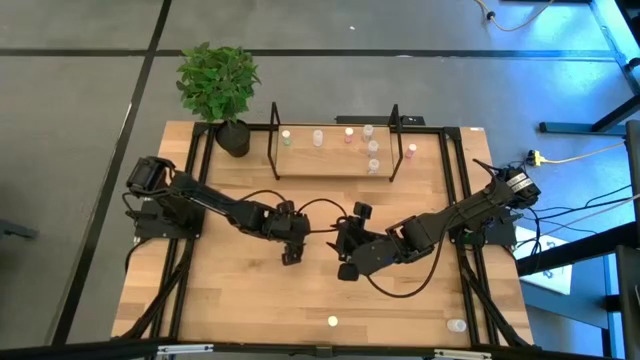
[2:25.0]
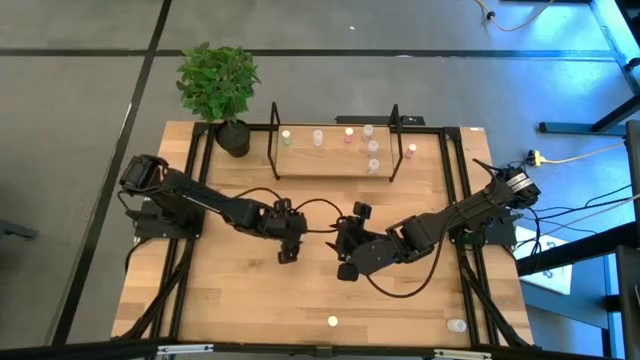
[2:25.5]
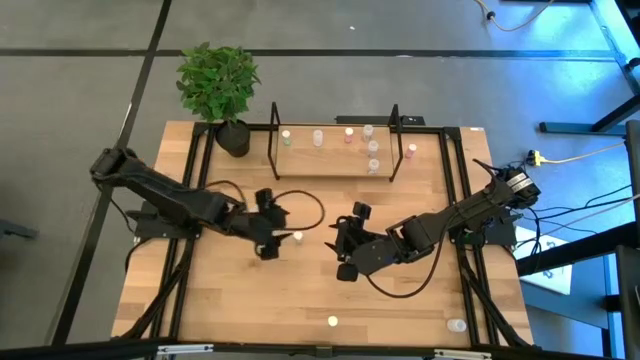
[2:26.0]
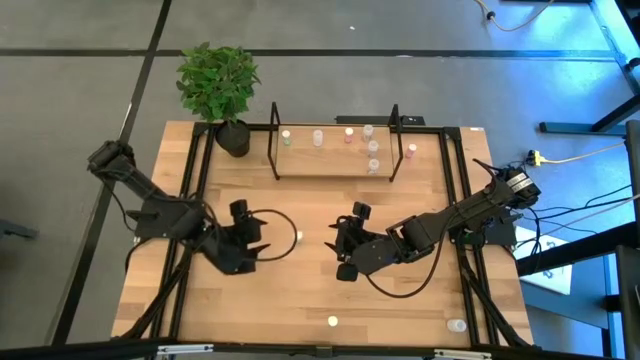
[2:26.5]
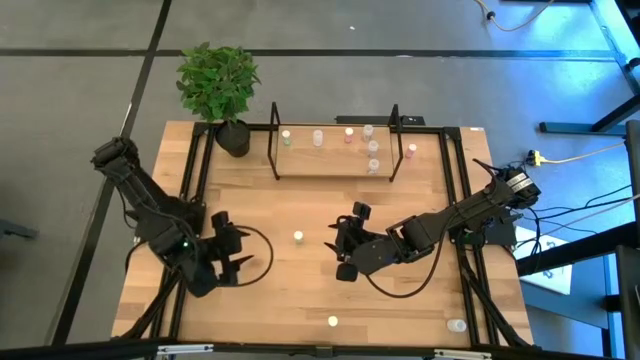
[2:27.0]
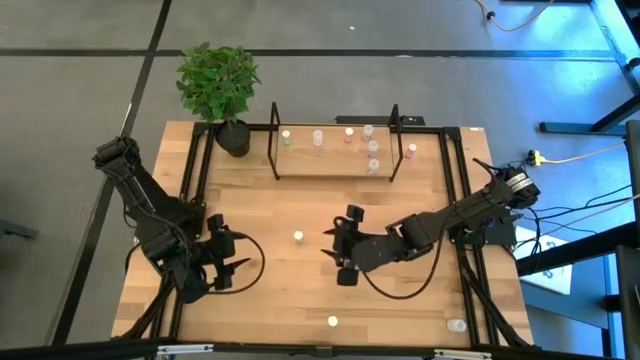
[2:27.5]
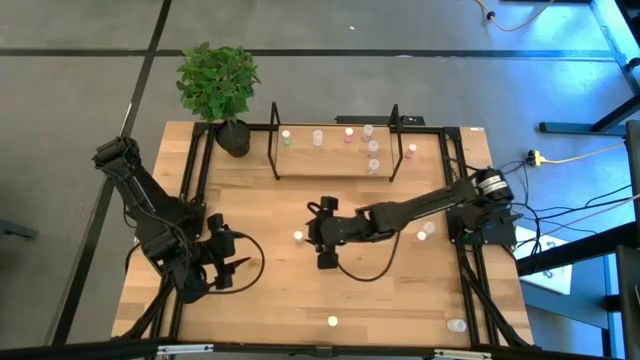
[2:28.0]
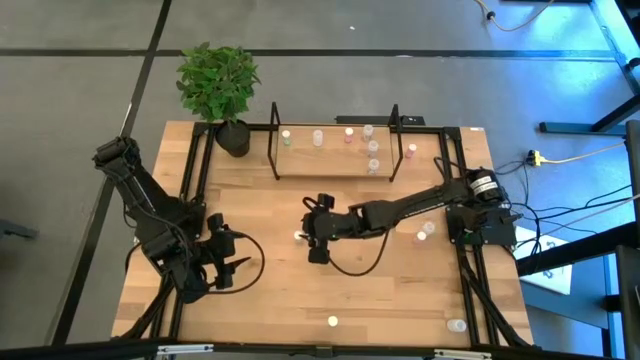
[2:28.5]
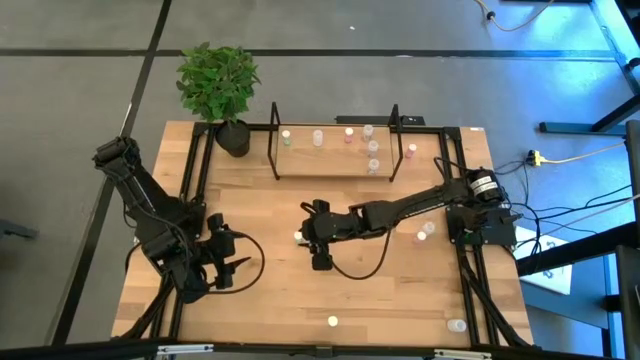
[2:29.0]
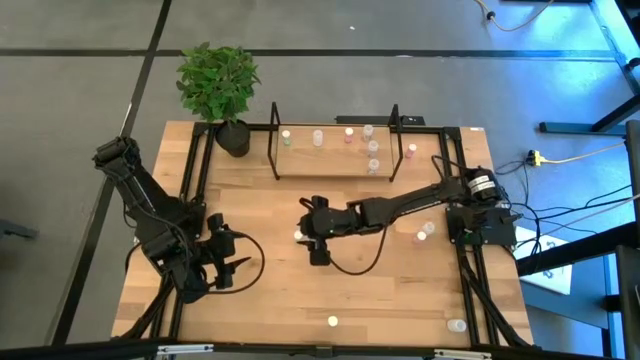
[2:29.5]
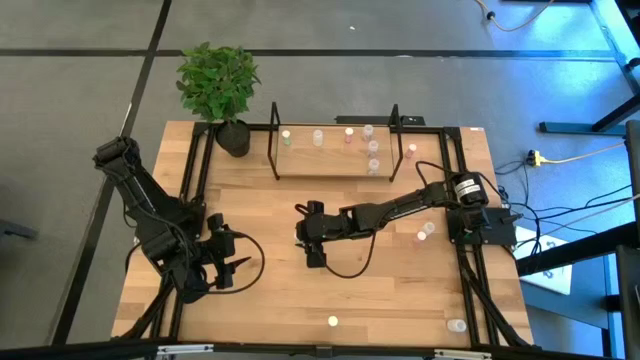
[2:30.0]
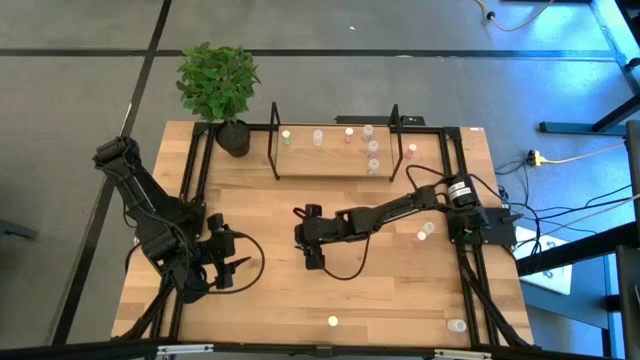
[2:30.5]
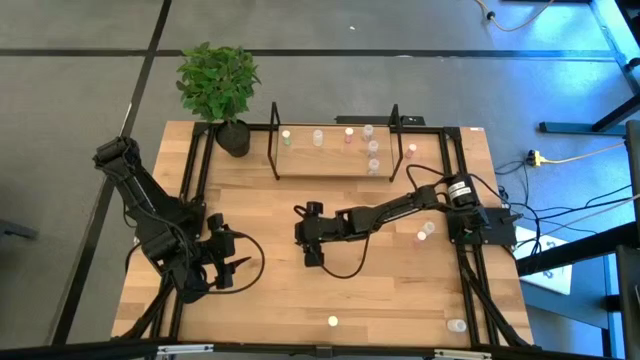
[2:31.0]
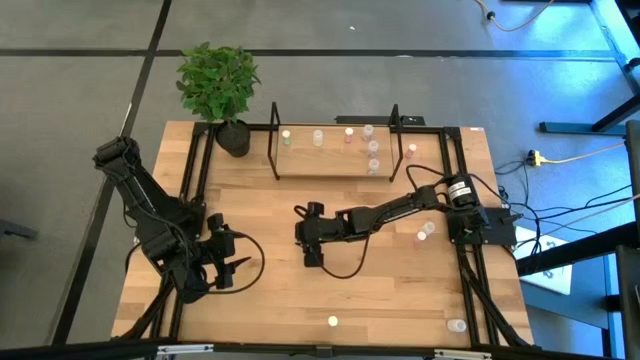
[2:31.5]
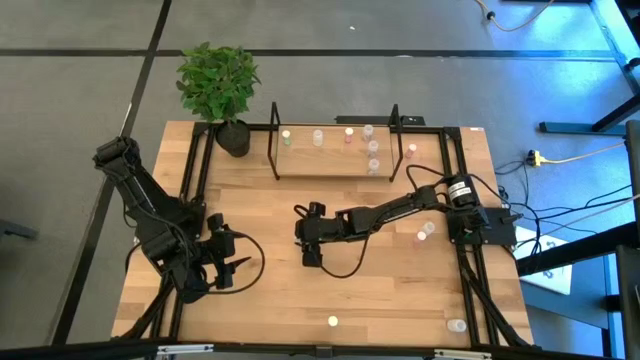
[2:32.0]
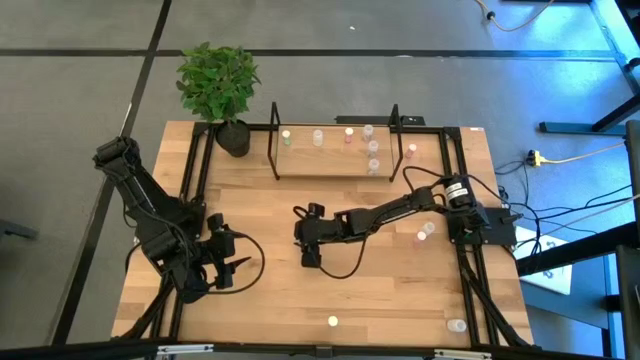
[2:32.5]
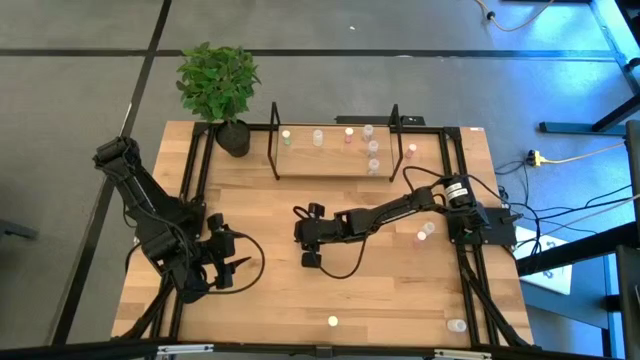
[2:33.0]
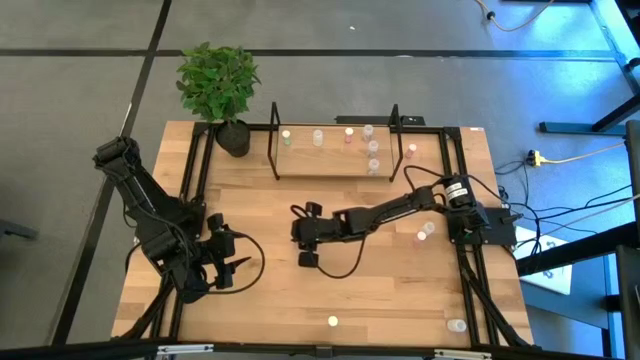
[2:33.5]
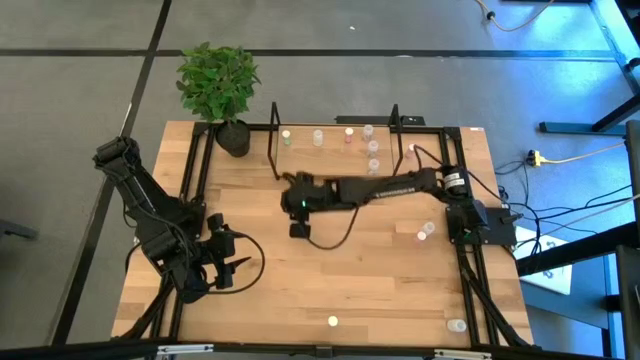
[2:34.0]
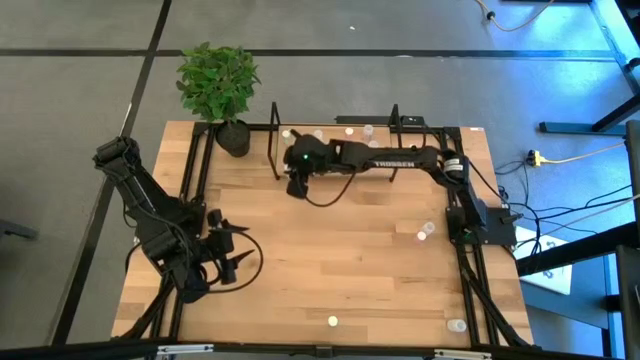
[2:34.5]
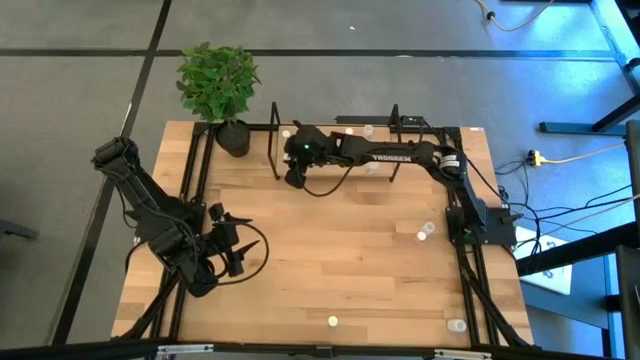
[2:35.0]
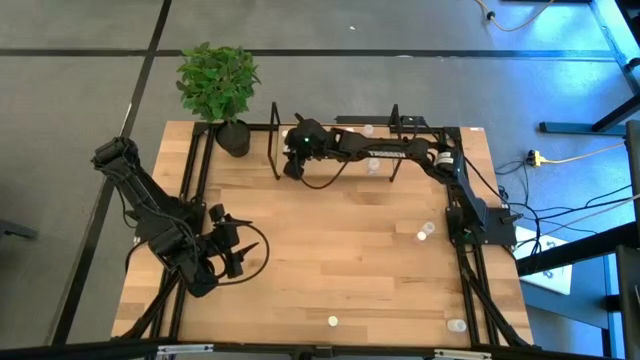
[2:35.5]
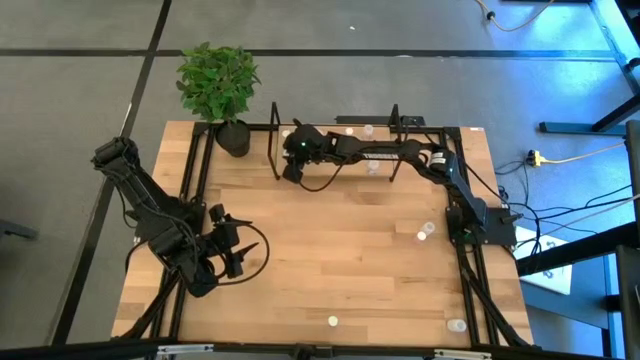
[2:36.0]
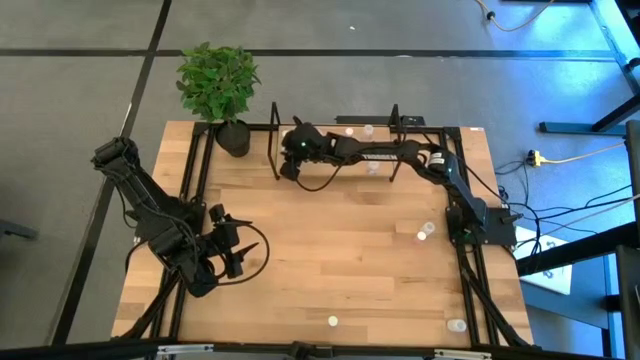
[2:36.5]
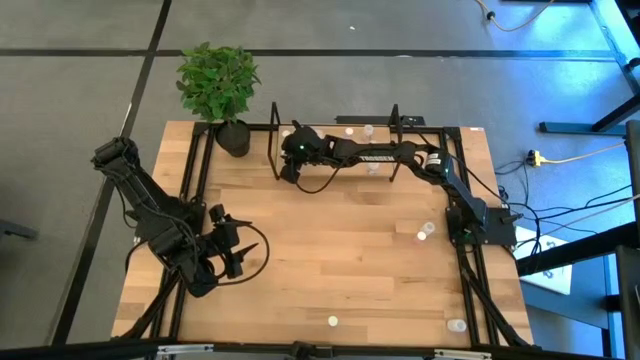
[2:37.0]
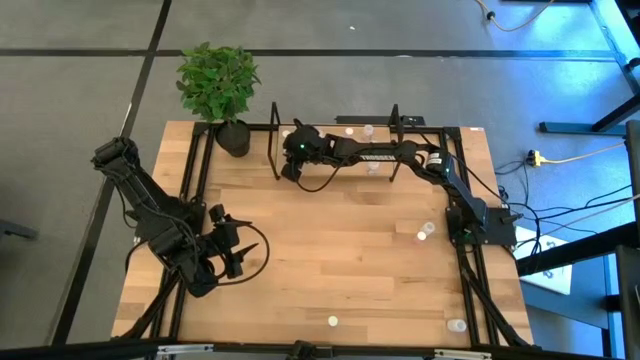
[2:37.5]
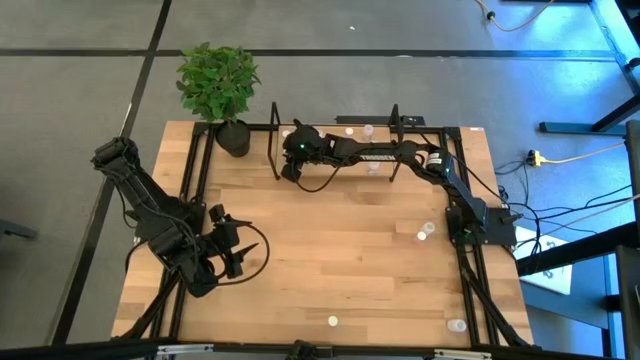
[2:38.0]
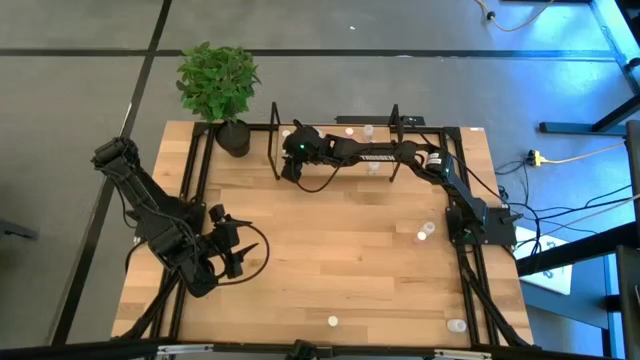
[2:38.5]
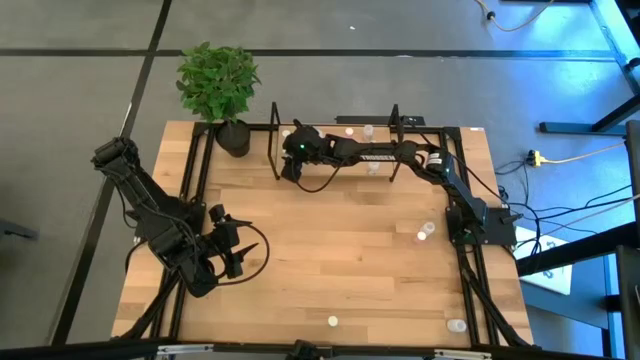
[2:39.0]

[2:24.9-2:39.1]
Task: Pick and place medicine bottles onto shelf by color
Put the bottom left blue medicine bottle on the shelf aligned with the other blue medicine bottle

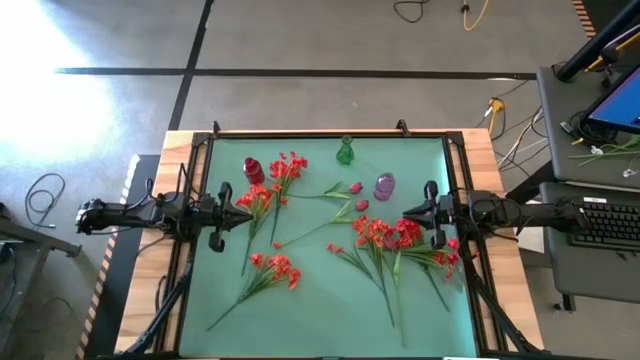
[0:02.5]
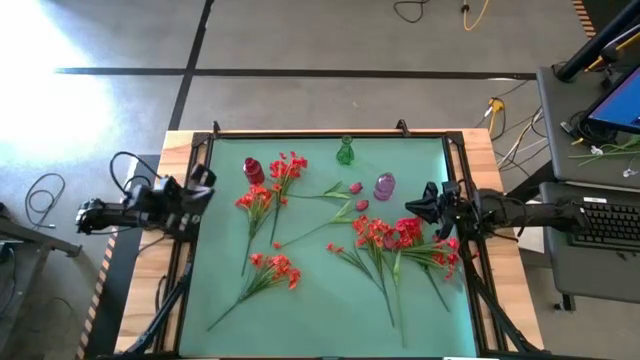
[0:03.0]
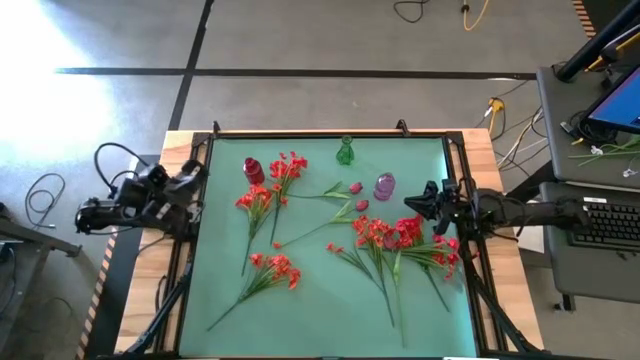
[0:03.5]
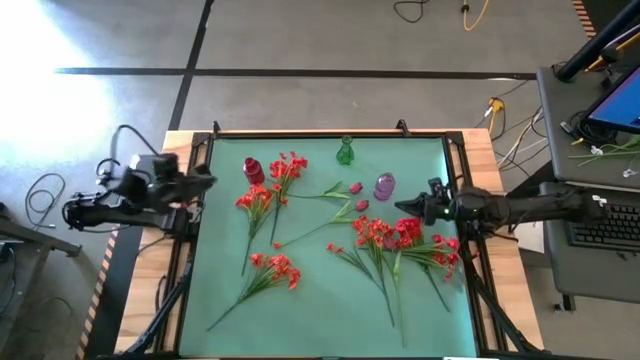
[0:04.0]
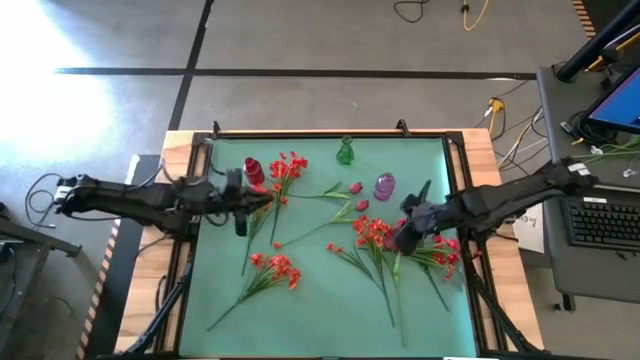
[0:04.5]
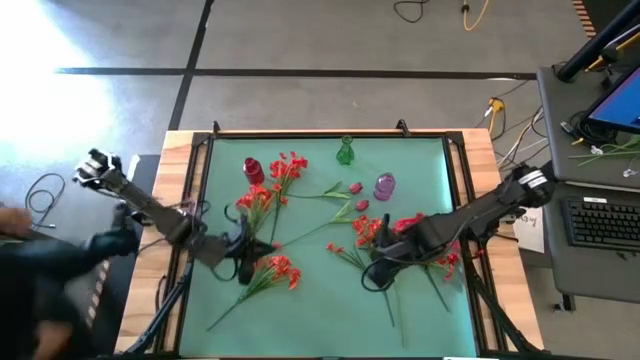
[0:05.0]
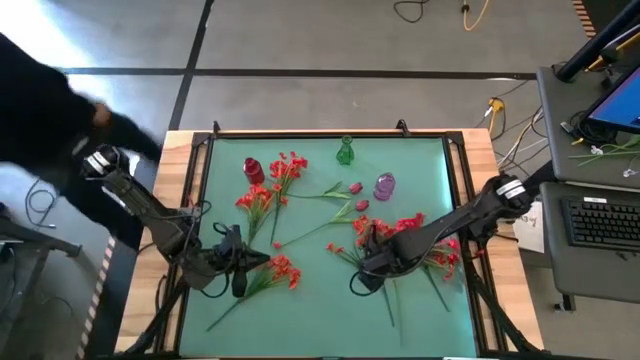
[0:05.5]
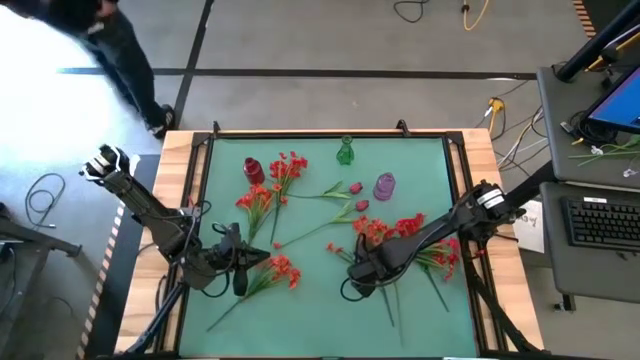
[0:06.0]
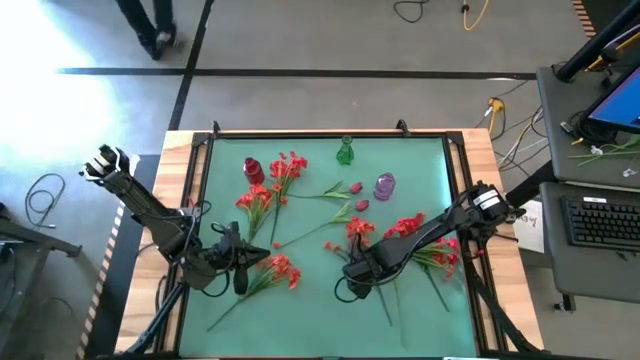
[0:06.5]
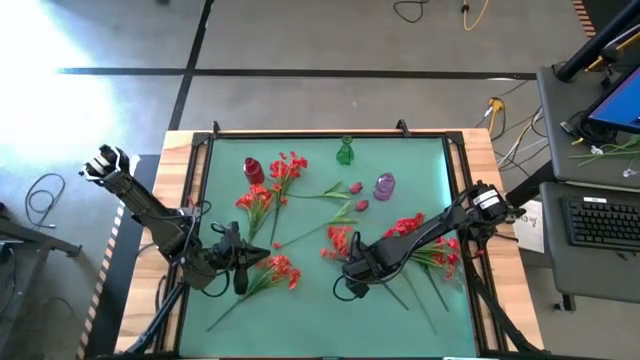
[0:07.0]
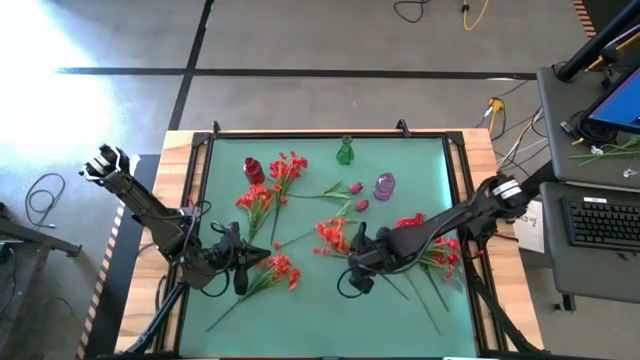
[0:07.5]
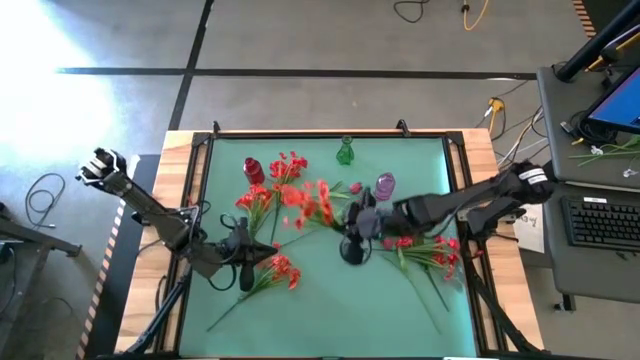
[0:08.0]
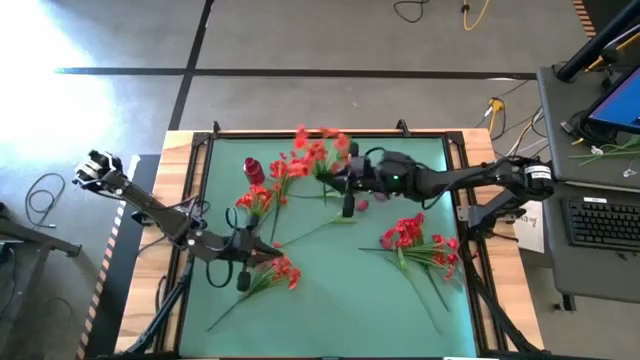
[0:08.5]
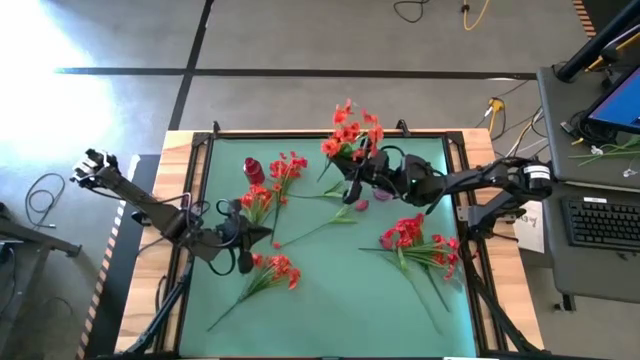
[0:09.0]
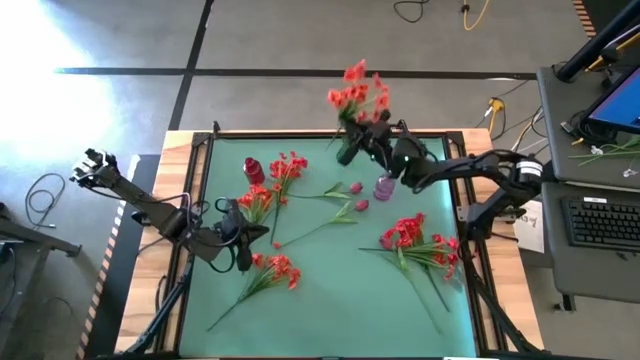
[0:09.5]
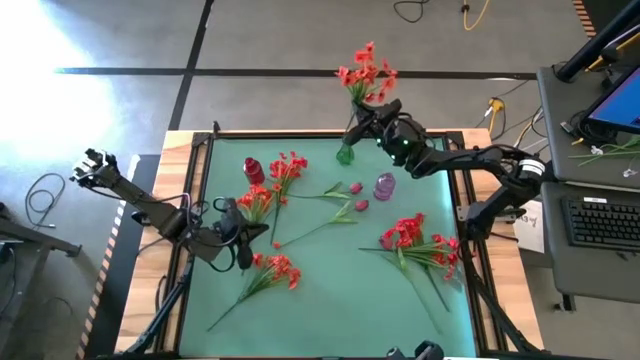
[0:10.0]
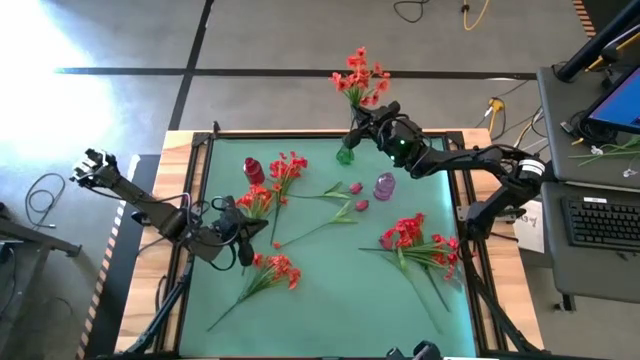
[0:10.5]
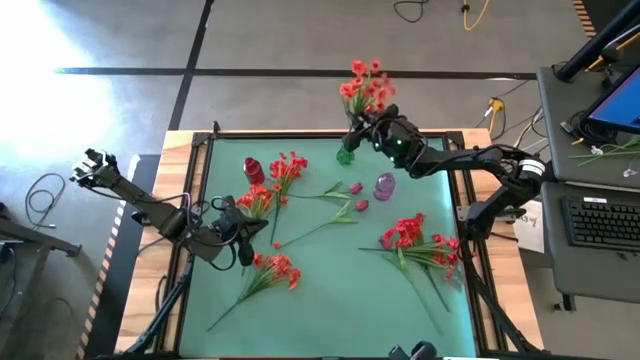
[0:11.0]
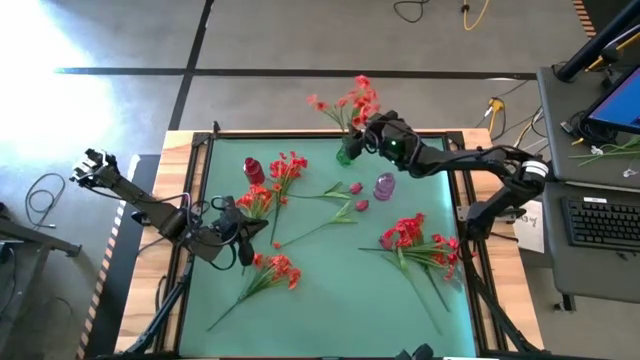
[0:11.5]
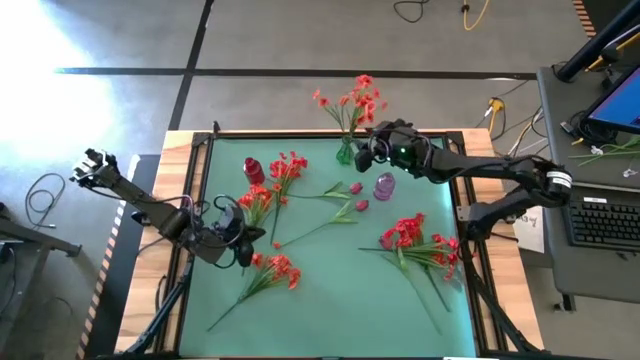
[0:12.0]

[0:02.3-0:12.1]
Task: Sort flowers into vase by color
Put the middle right orange flowers into the green flower vase
